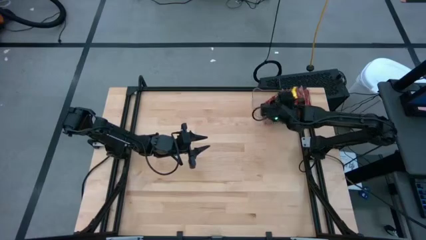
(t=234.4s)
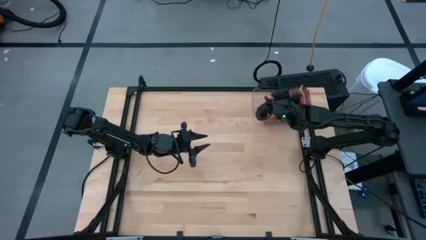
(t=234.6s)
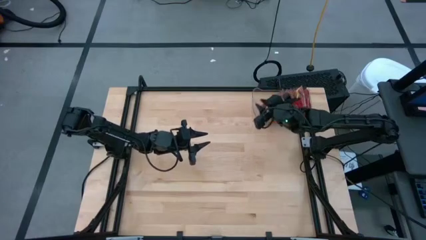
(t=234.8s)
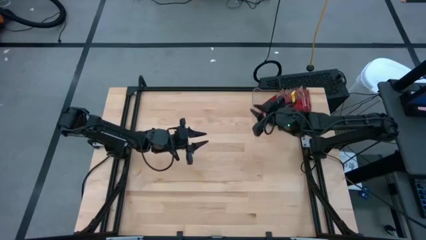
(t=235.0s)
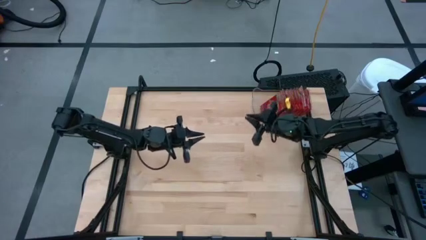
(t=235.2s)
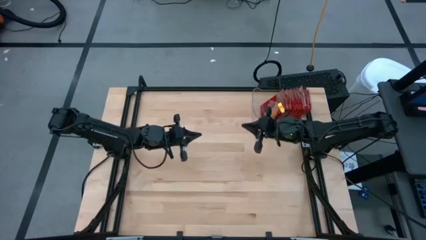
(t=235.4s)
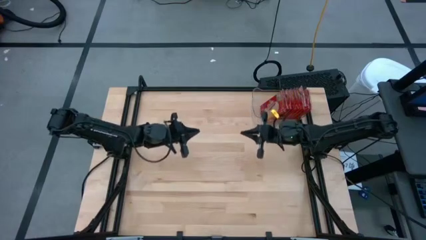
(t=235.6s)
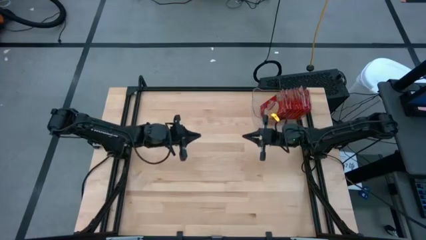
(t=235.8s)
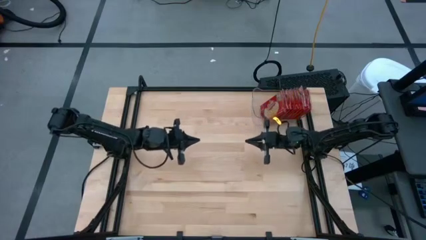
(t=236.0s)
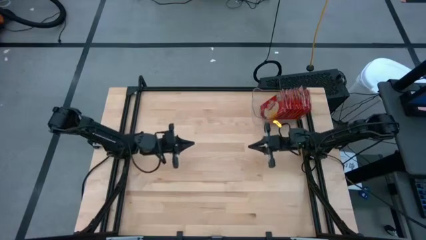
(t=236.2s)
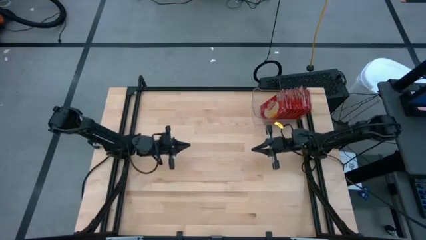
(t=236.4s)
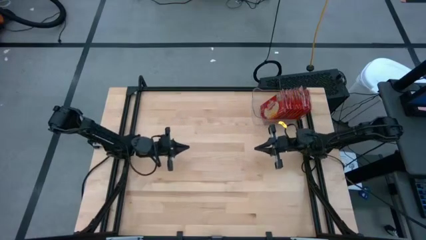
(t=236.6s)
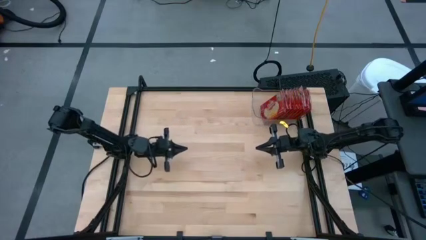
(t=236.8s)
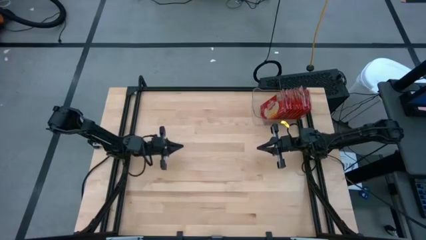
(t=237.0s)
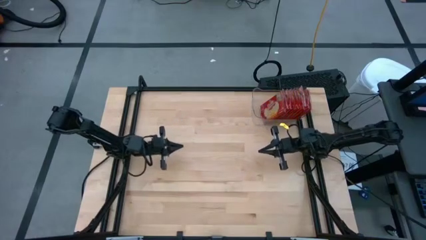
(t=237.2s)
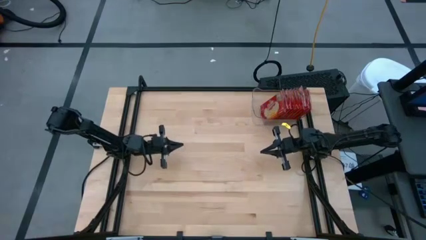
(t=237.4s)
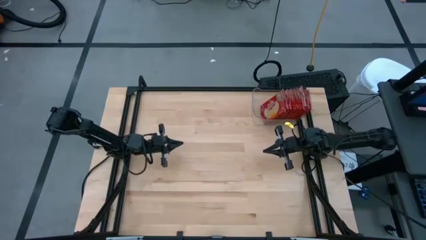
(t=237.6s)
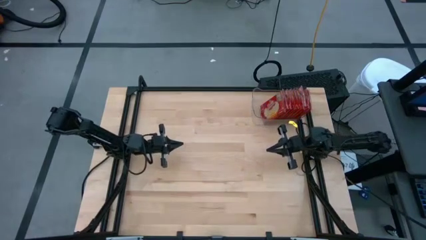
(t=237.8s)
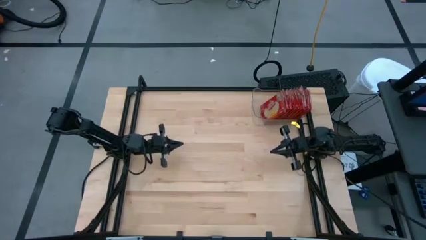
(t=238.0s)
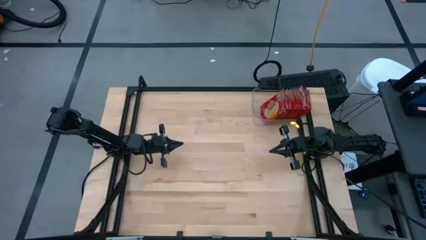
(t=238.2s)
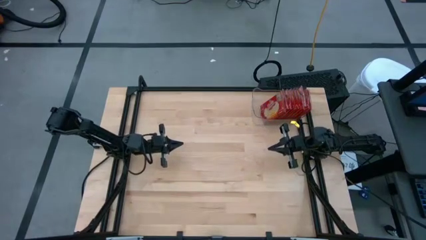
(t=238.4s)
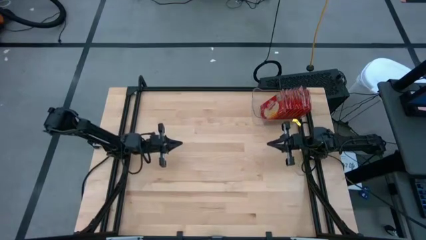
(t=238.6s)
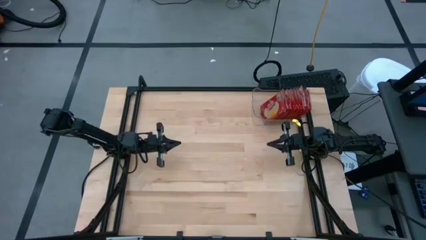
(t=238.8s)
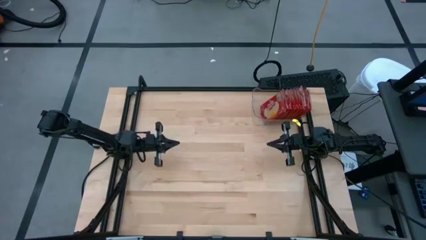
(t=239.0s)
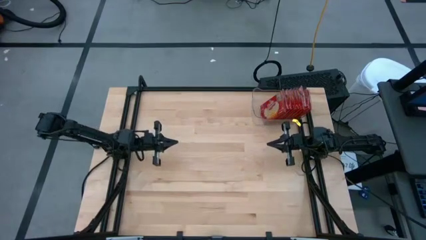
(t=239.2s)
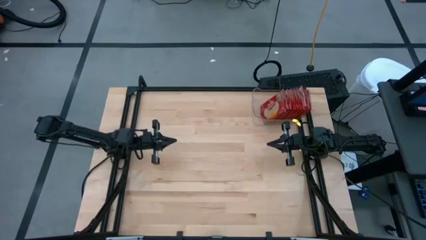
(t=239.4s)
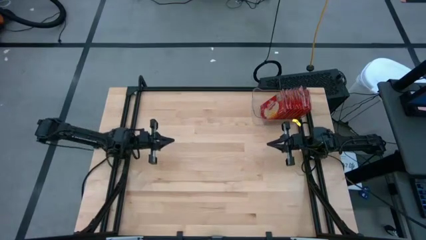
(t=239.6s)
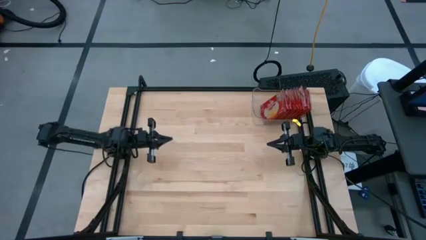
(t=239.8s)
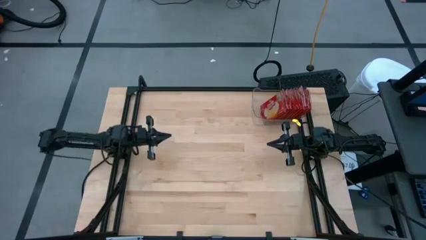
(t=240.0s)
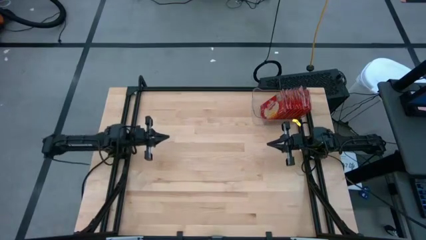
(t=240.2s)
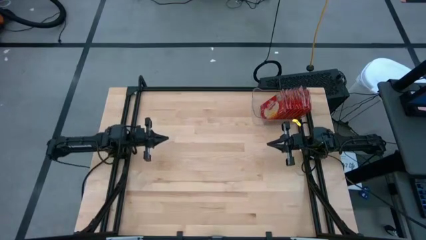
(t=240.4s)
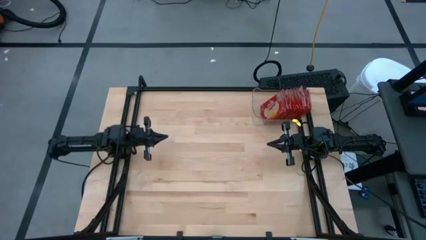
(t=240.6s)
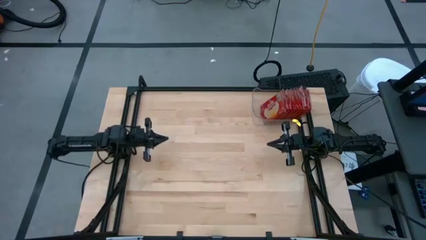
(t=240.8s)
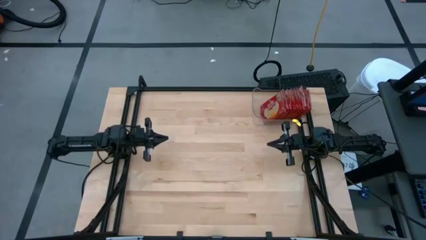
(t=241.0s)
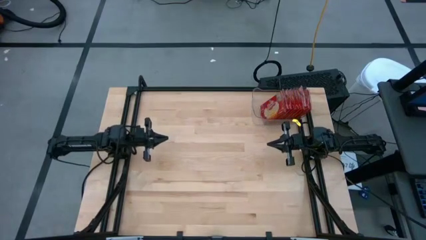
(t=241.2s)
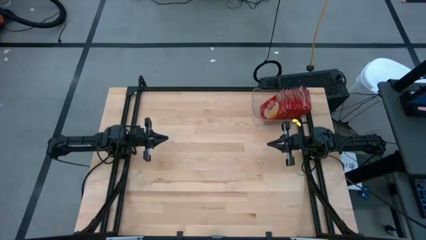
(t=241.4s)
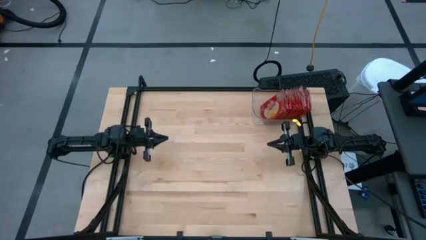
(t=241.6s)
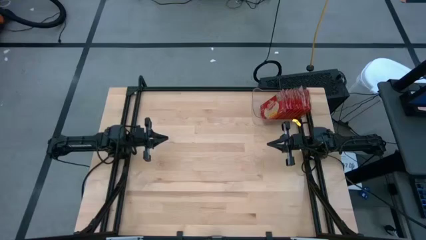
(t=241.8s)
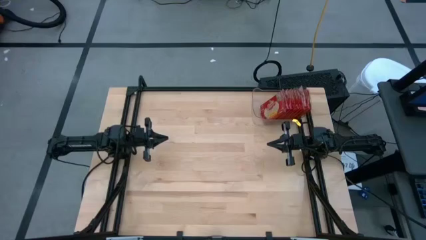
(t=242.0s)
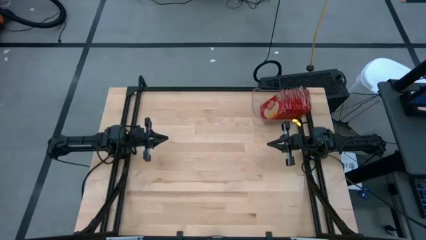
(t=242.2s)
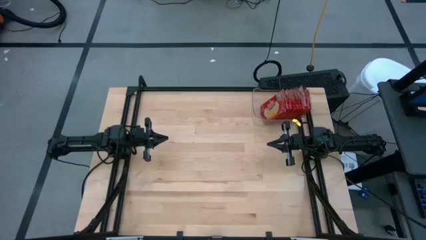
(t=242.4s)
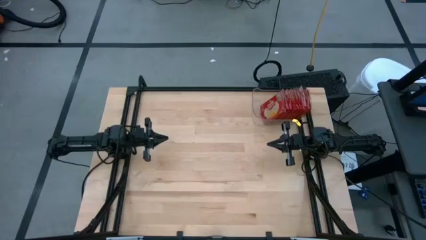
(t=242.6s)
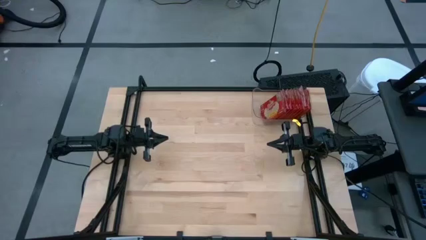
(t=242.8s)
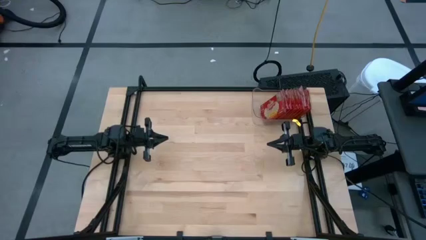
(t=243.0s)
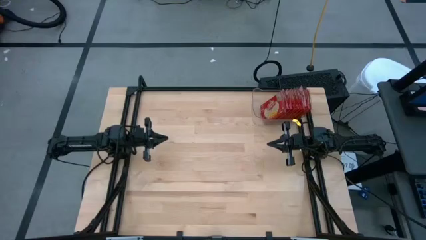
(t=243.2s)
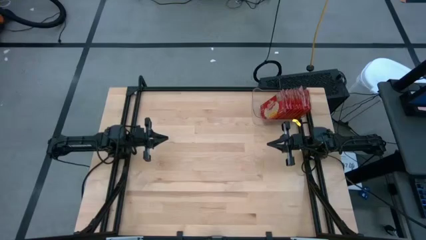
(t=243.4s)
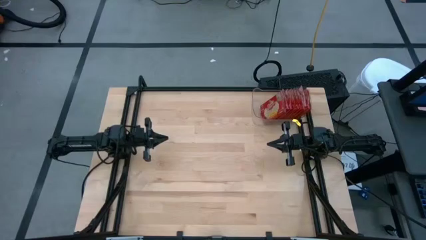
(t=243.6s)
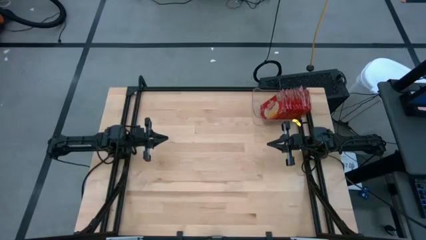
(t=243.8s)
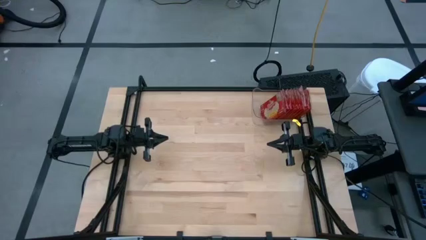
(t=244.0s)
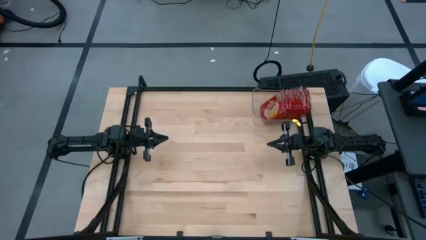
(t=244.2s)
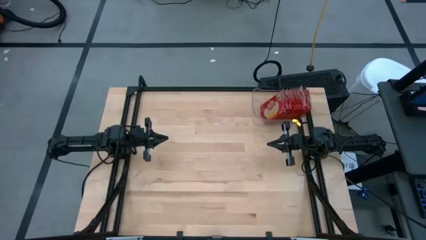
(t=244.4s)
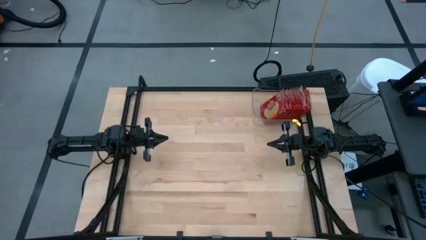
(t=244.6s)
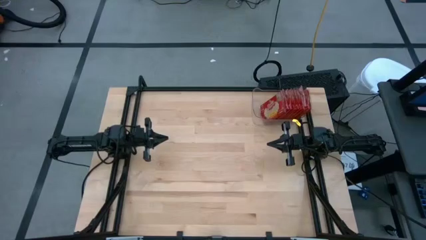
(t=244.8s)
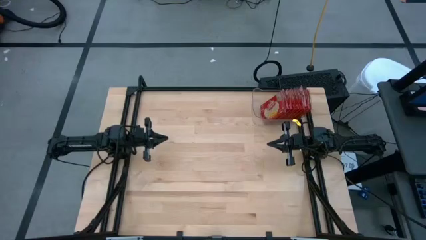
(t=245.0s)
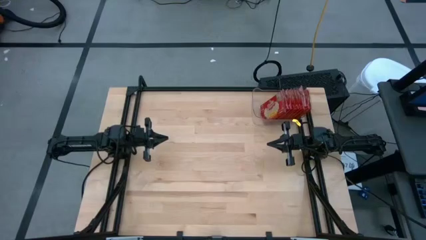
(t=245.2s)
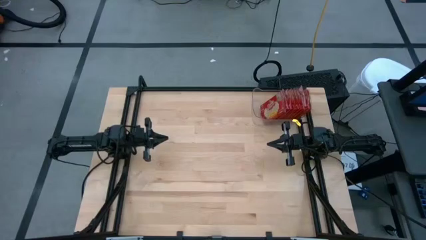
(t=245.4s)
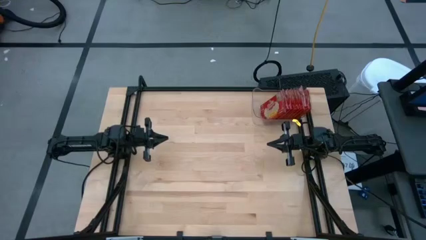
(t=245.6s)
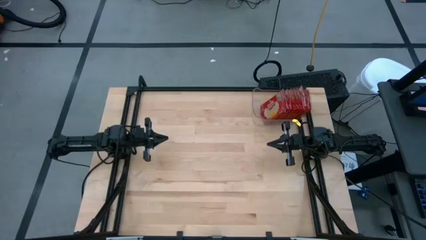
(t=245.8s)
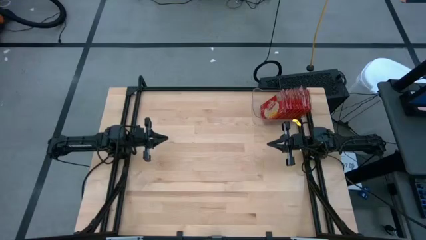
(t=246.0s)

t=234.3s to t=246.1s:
Task: Sort popcorn bags into baskets
Return to Home Position

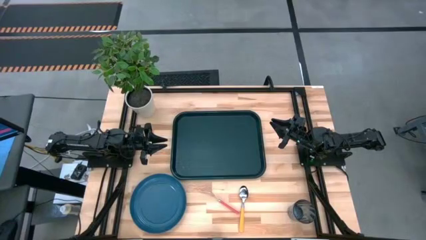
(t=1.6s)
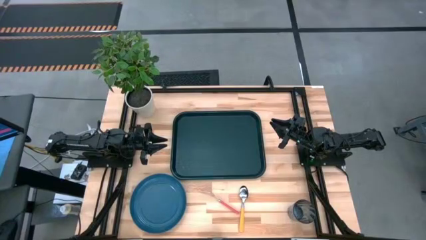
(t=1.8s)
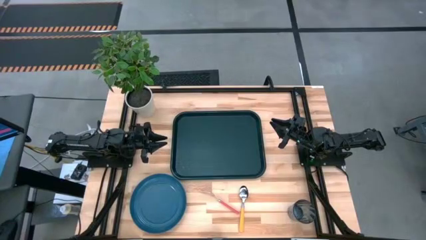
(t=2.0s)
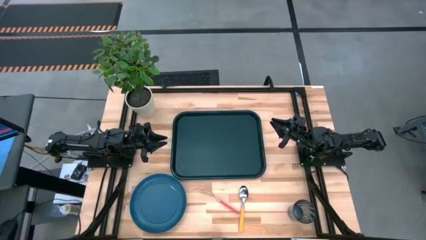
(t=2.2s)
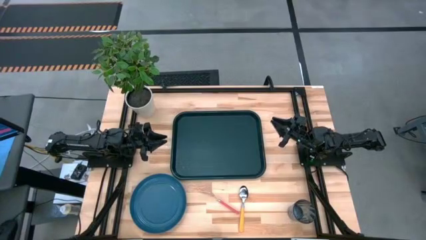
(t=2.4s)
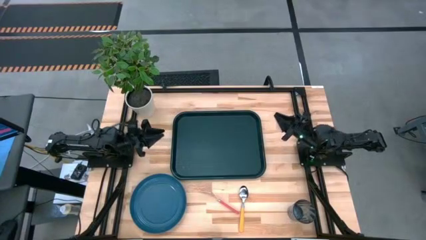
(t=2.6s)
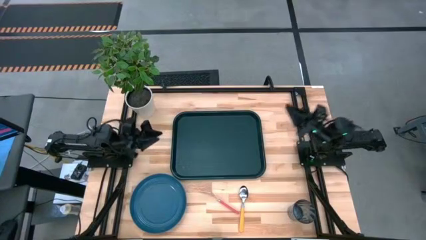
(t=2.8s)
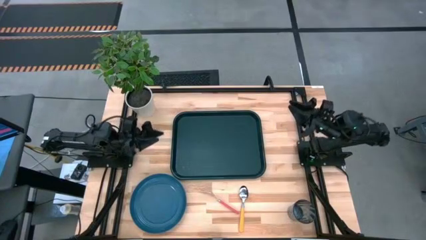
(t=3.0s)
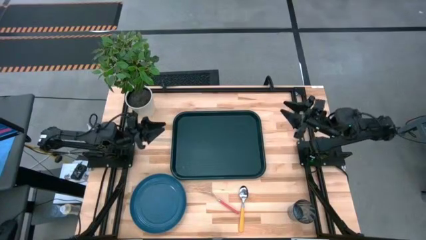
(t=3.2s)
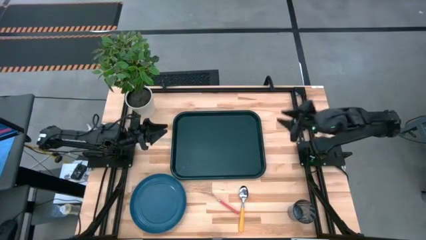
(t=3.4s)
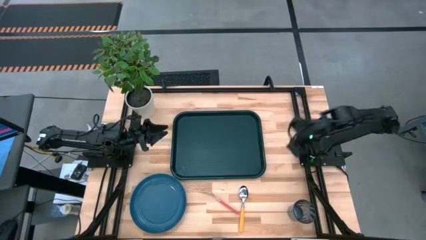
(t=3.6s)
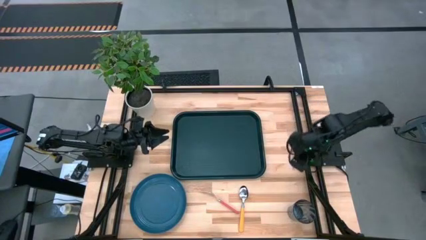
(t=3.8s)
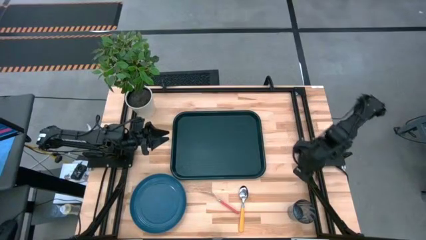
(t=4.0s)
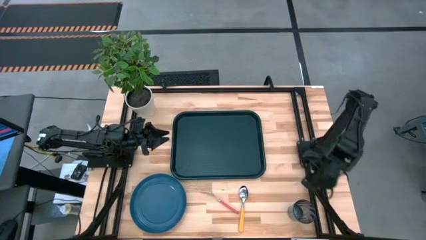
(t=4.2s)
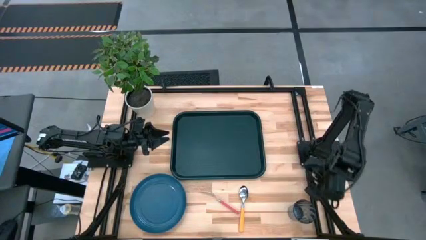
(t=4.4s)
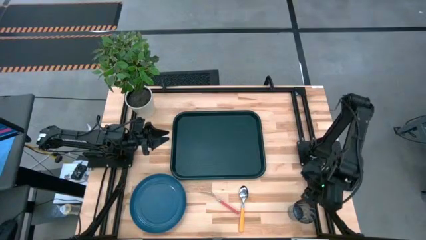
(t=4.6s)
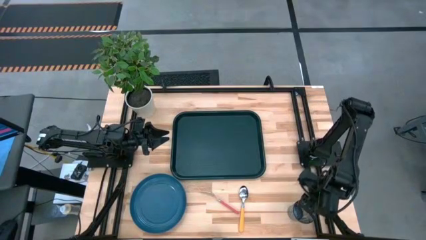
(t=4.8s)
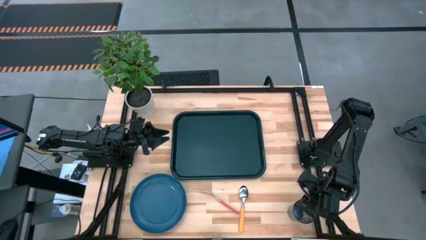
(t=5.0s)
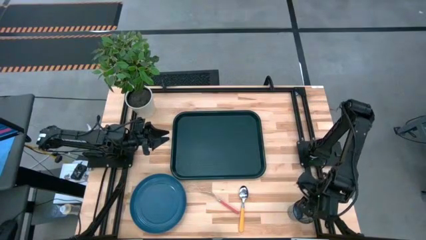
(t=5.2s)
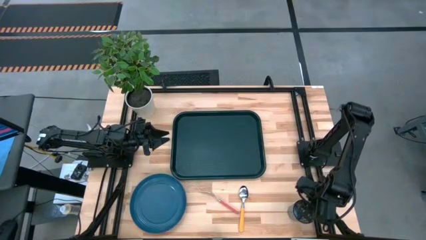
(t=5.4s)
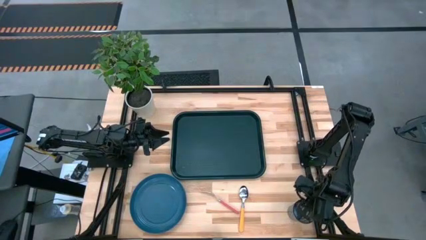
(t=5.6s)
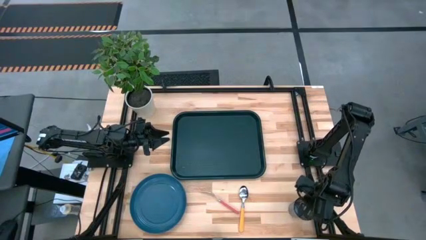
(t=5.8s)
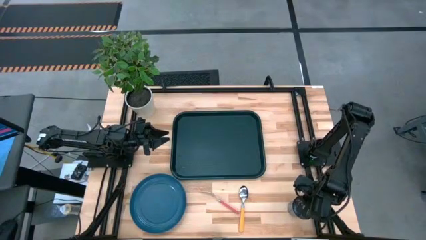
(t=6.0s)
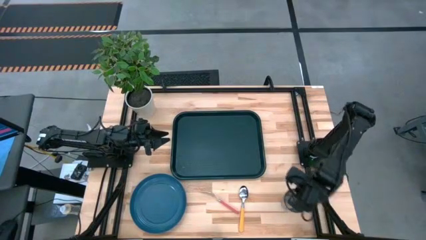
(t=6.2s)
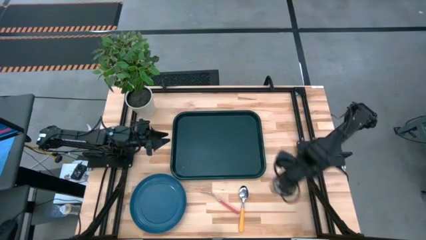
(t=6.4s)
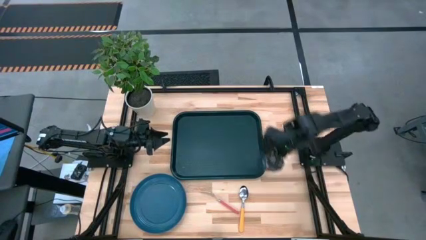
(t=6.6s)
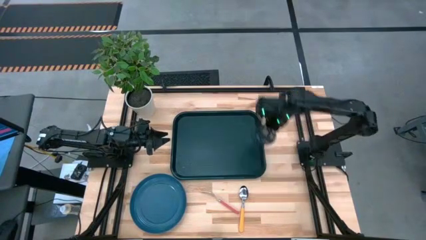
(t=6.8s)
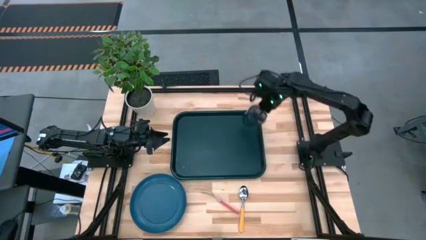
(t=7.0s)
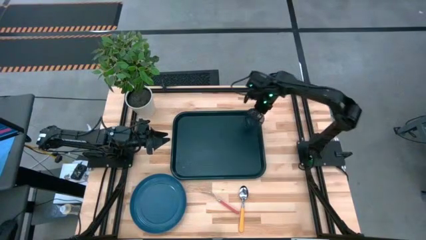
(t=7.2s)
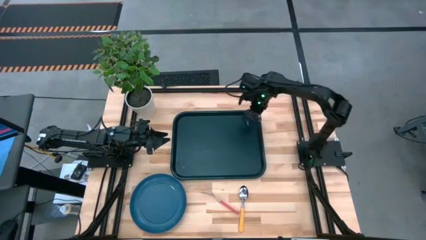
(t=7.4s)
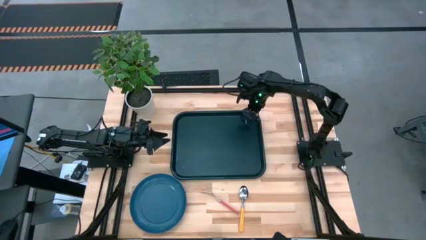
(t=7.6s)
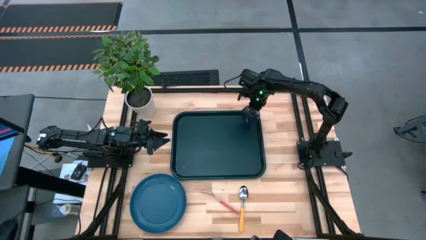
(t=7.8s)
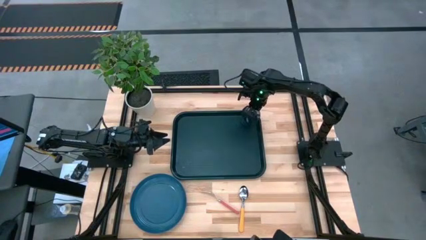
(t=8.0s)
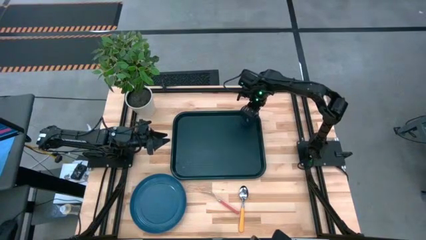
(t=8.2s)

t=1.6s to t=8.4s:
Task: Pick and place plate/cup/fork/spoon on tray
Put the blue cup on the black tray
